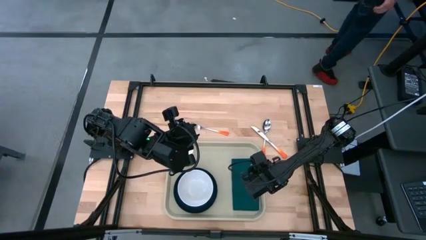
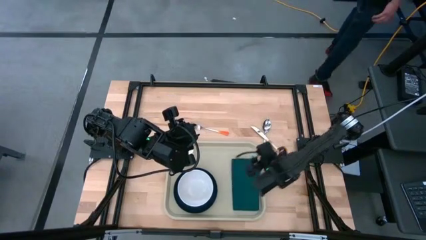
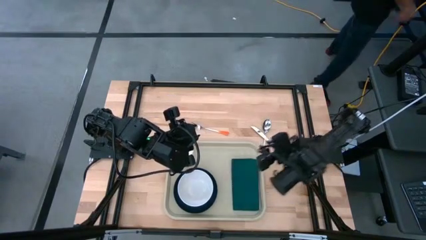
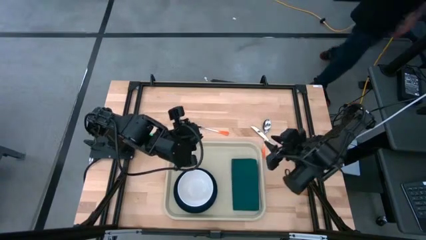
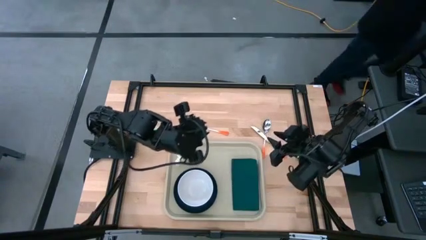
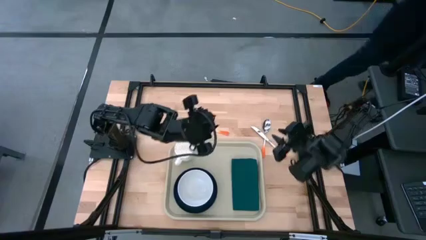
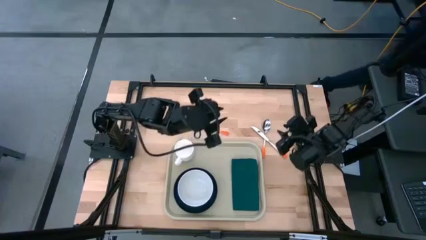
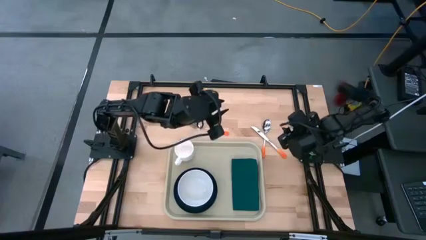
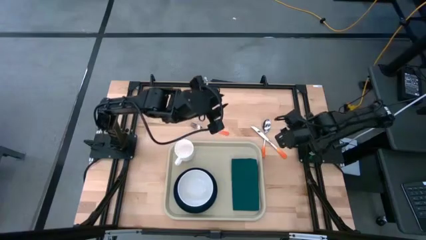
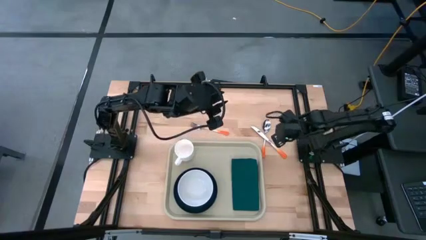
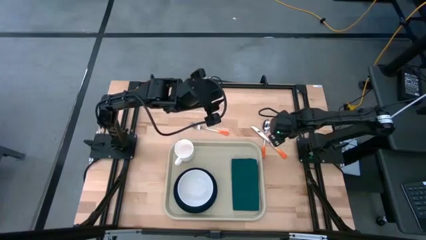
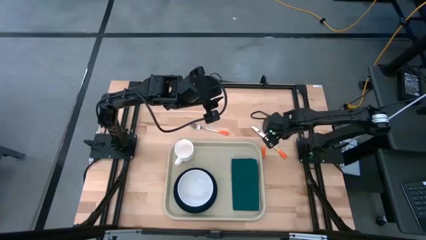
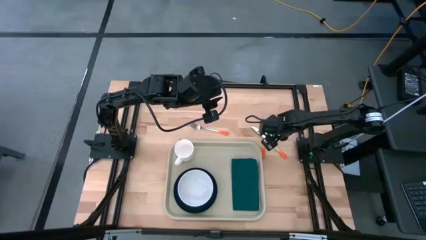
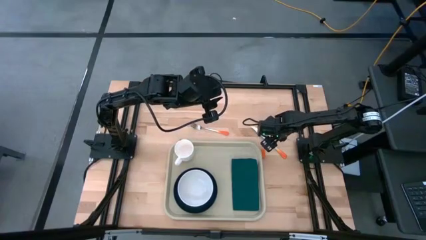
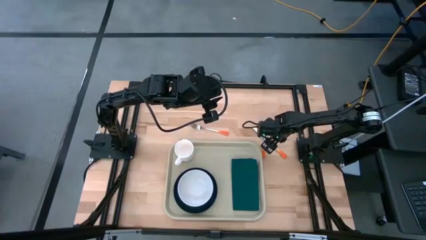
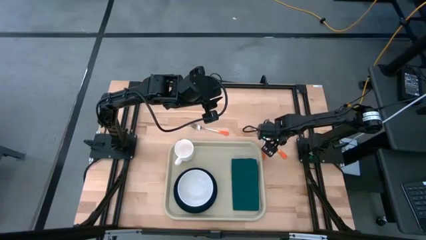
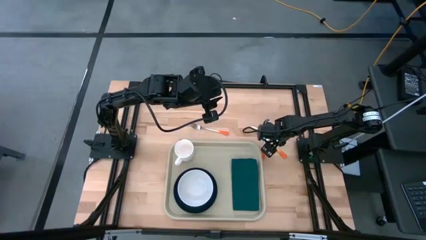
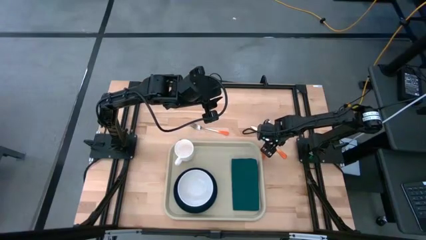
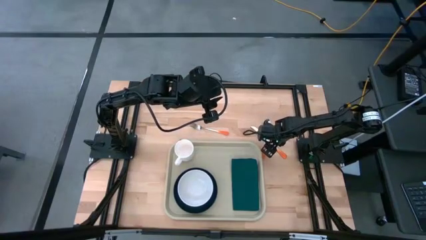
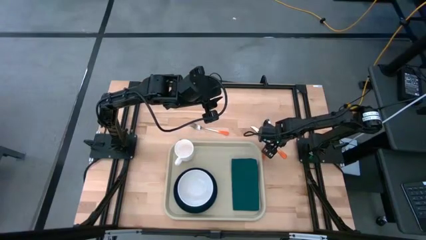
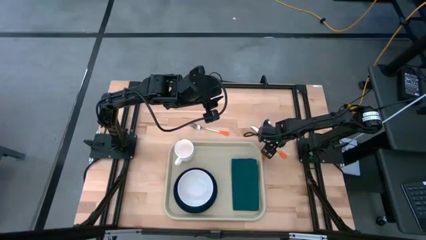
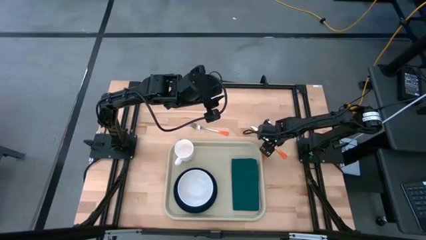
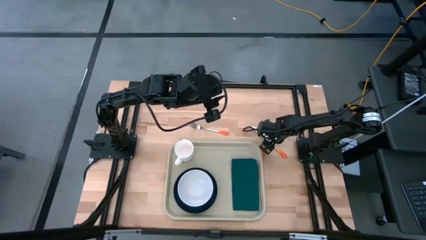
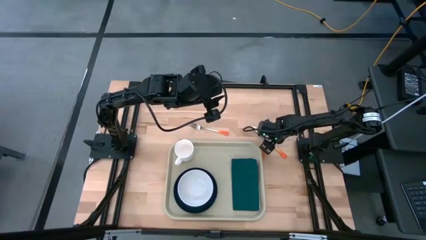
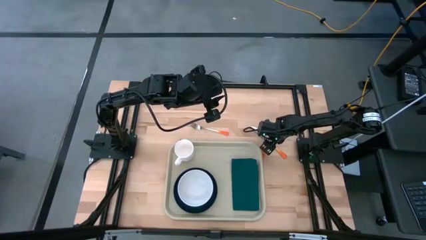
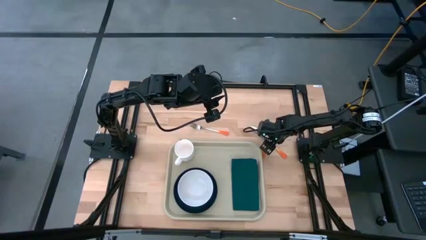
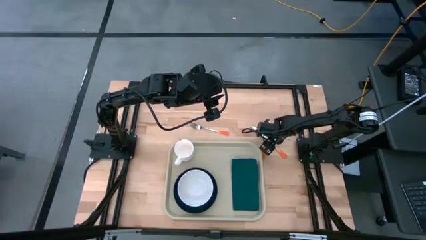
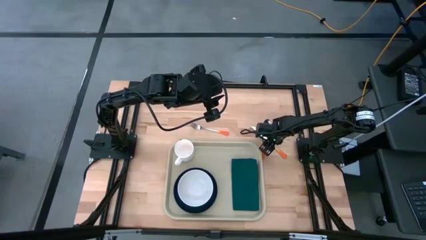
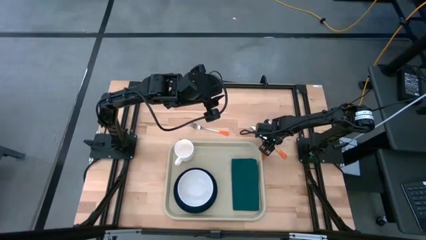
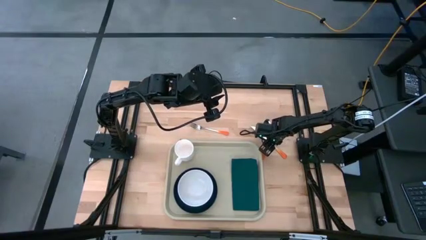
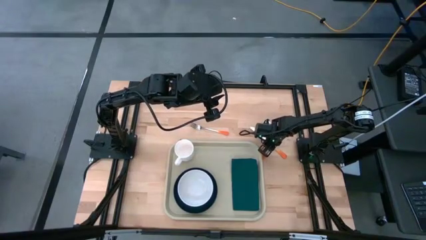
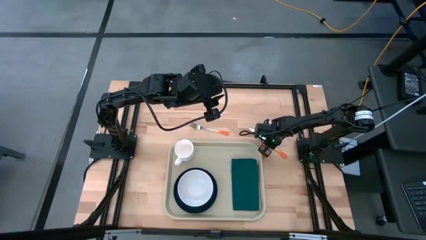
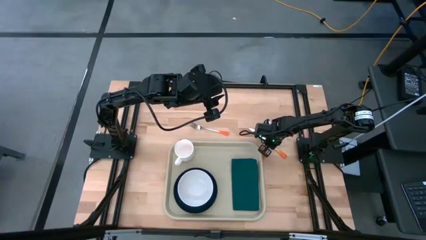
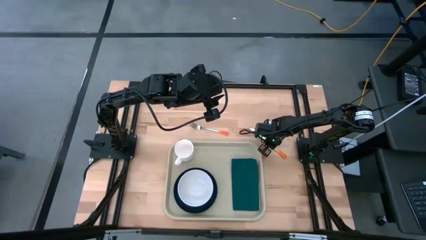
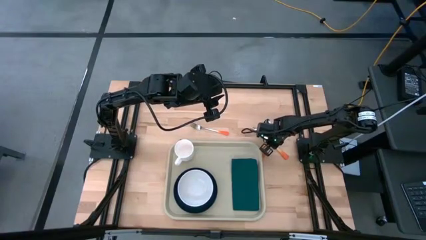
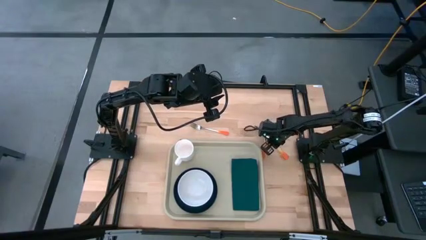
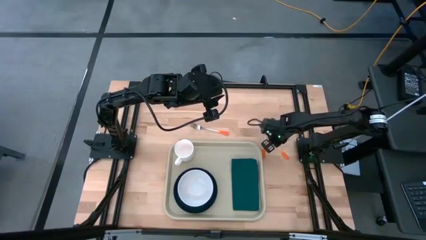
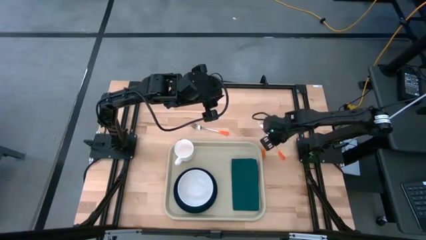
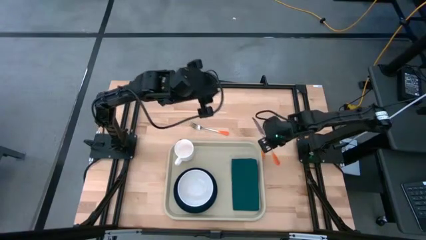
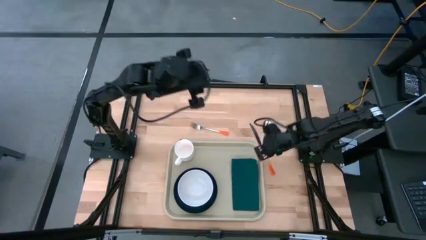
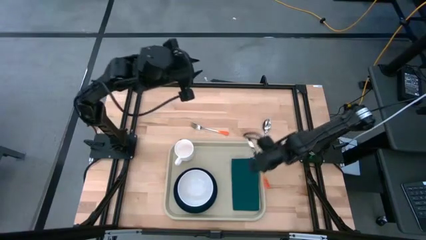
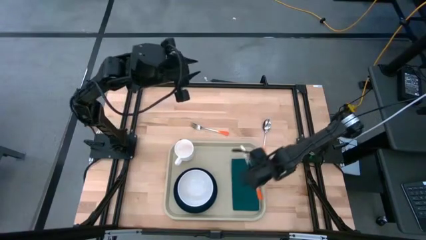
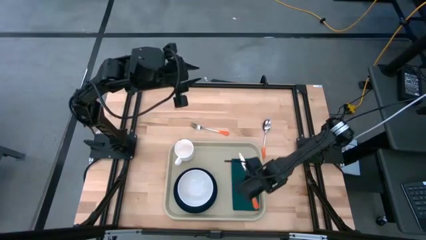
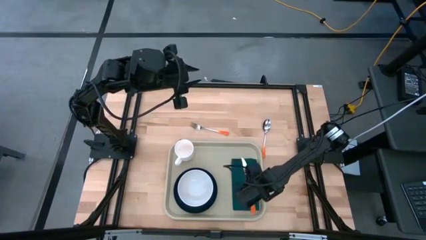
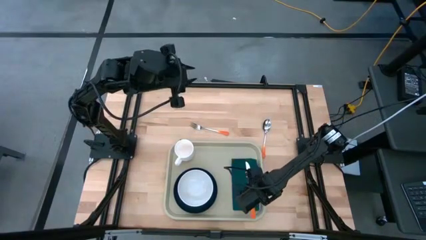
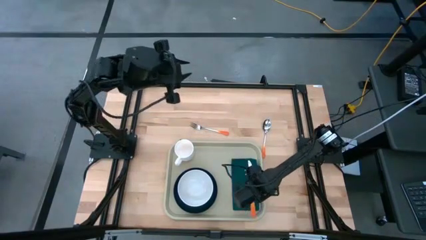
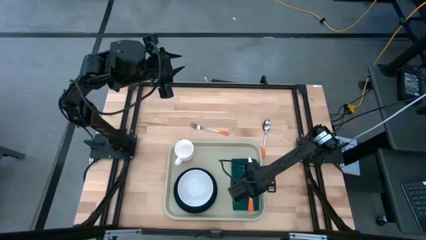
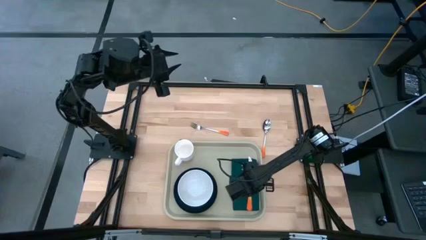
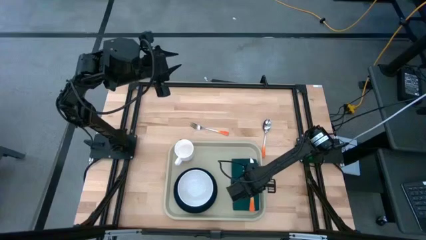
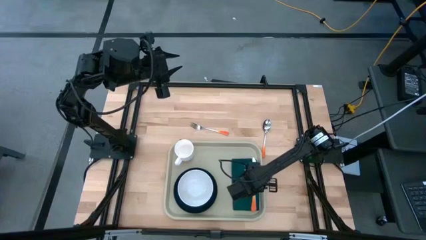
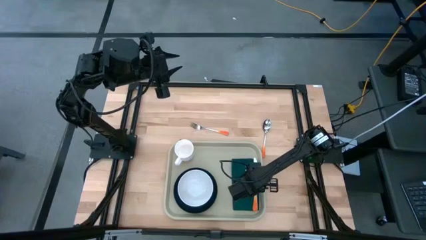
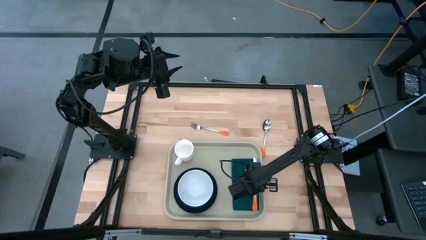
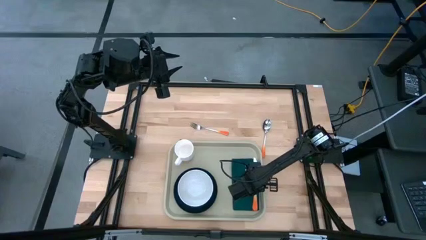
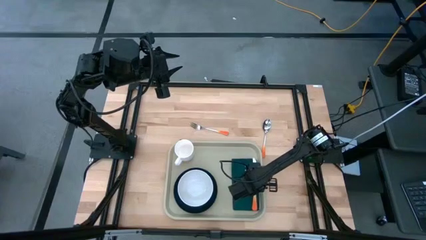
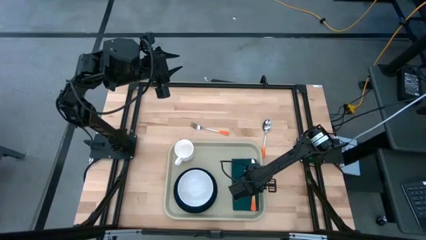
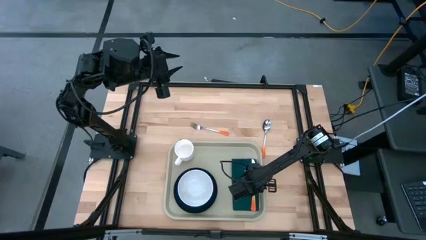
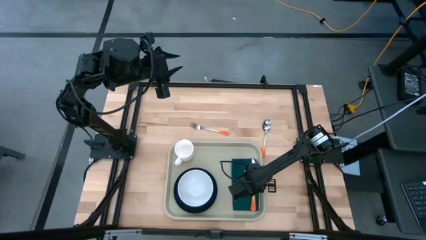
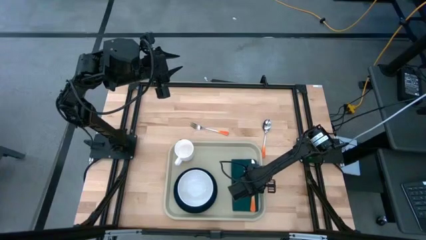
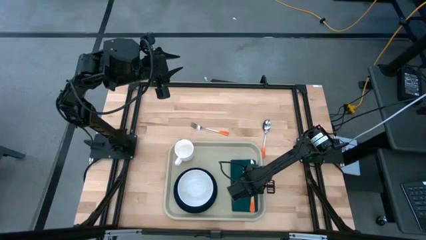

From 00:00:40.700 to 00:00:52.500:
Task: Set up tray
Put the orange knife on top of the dark green napkin
